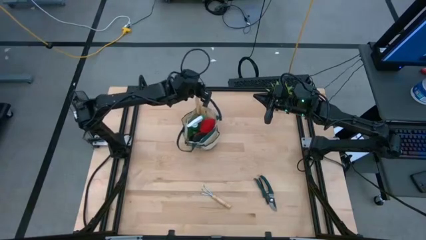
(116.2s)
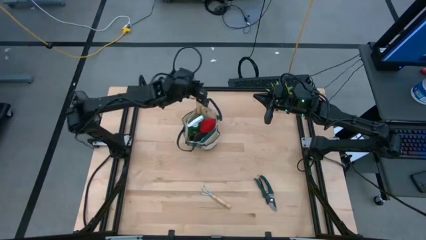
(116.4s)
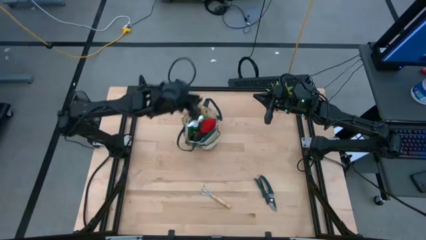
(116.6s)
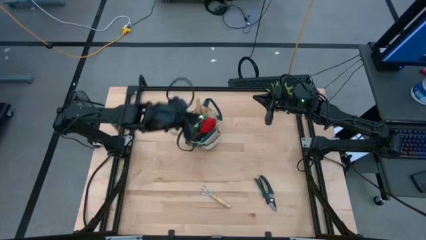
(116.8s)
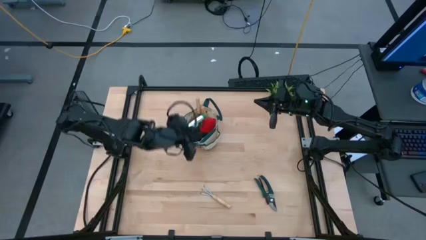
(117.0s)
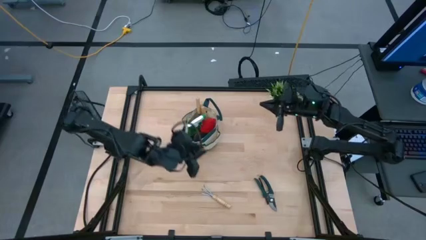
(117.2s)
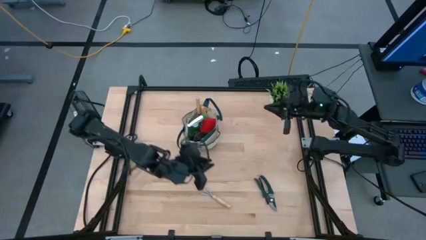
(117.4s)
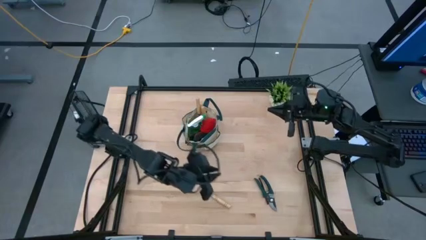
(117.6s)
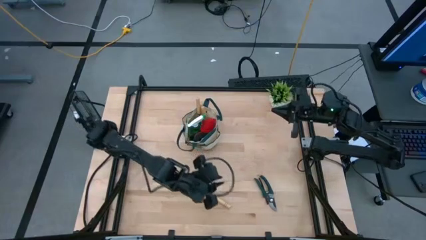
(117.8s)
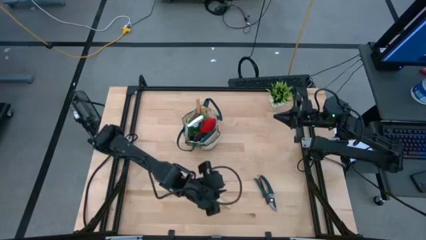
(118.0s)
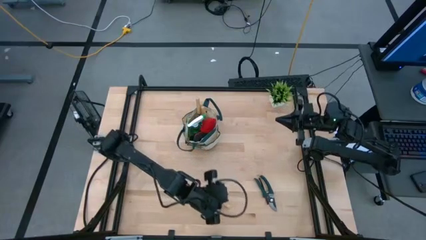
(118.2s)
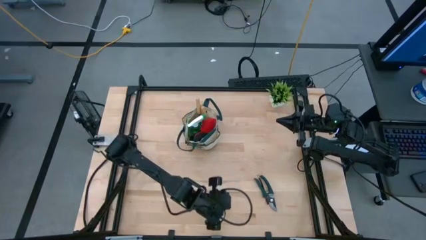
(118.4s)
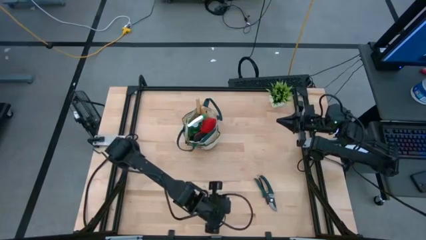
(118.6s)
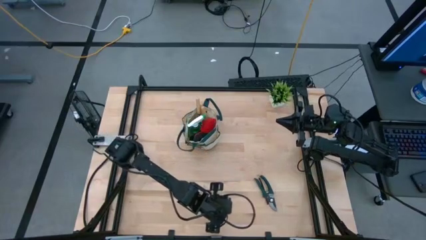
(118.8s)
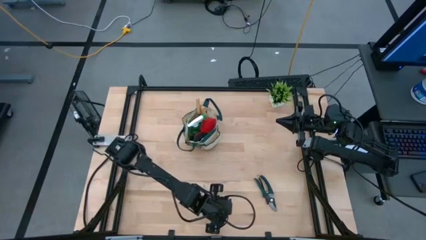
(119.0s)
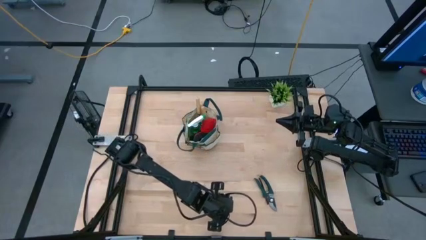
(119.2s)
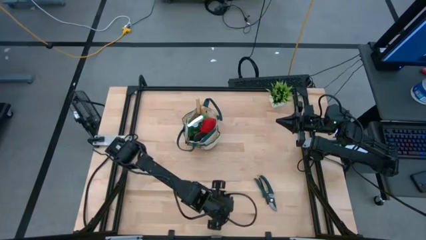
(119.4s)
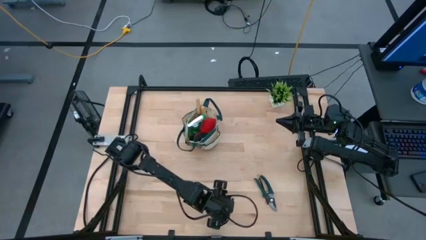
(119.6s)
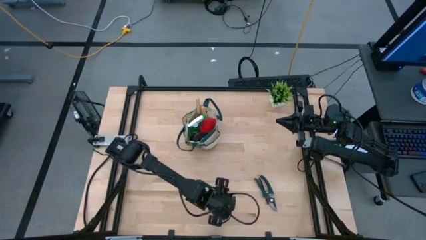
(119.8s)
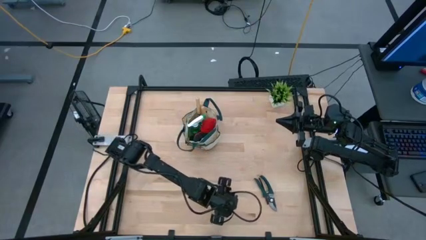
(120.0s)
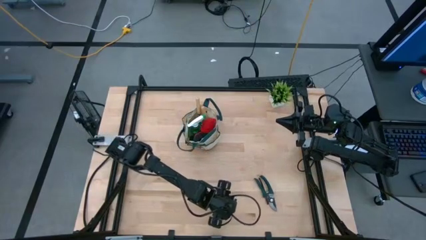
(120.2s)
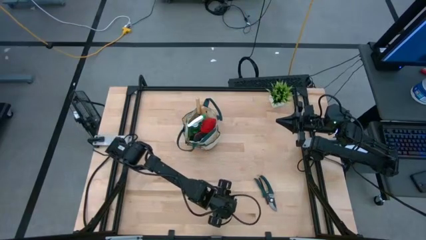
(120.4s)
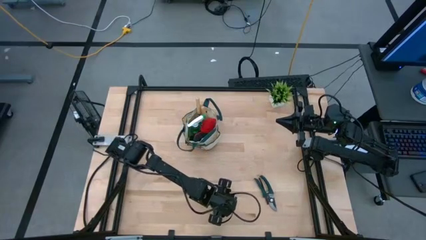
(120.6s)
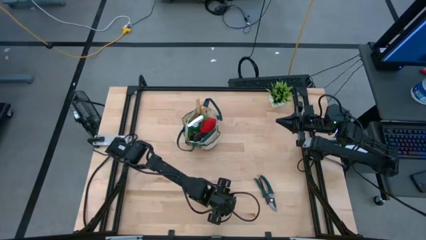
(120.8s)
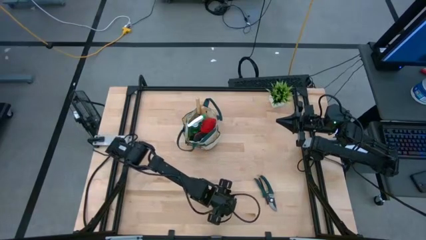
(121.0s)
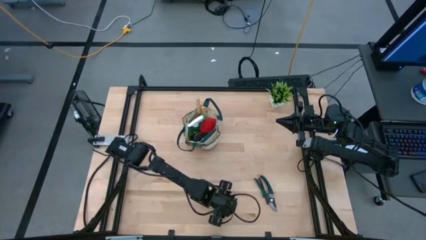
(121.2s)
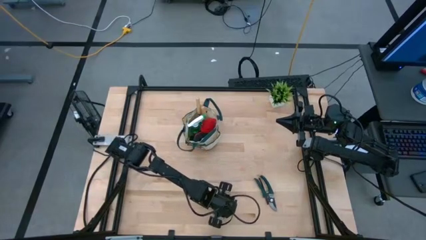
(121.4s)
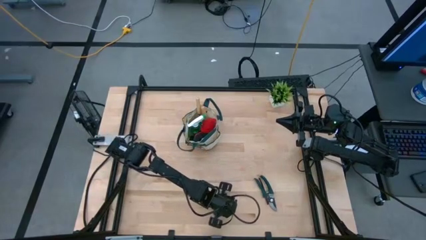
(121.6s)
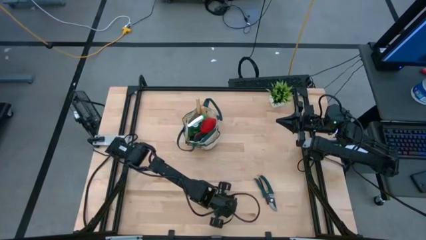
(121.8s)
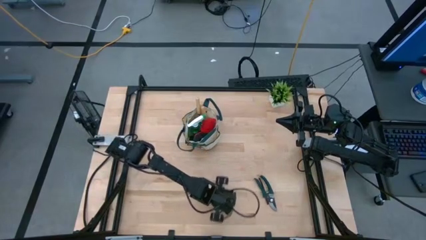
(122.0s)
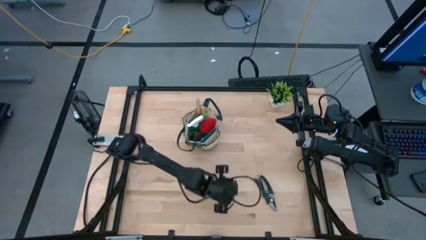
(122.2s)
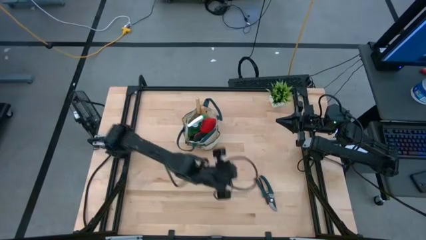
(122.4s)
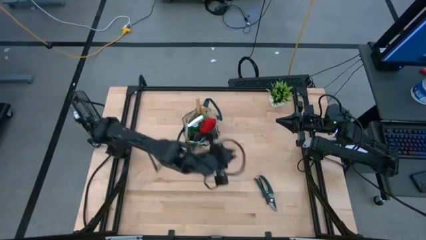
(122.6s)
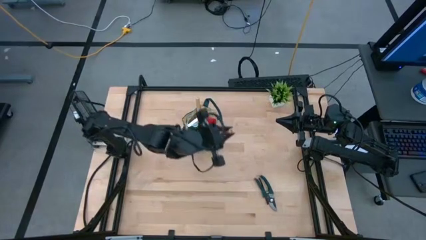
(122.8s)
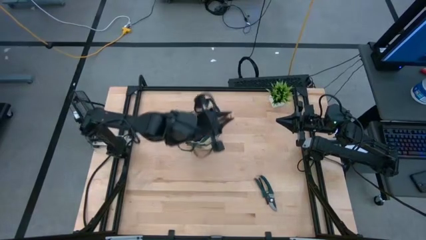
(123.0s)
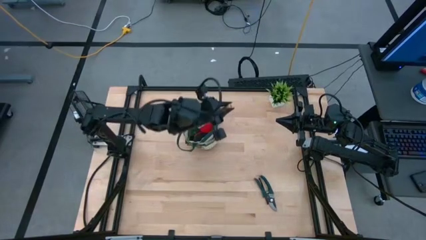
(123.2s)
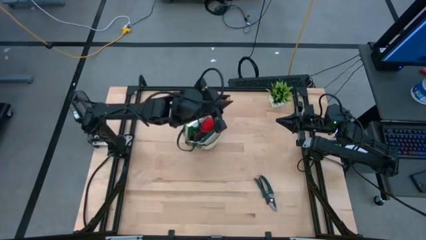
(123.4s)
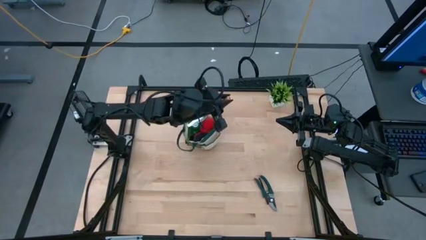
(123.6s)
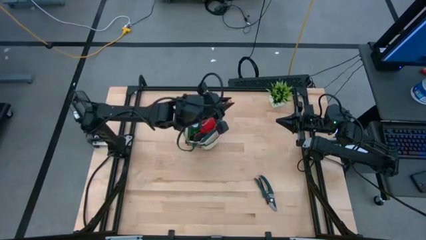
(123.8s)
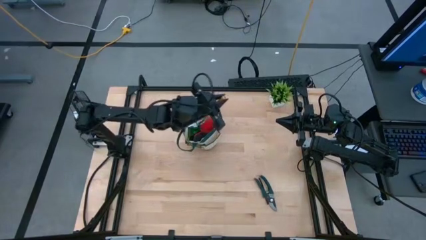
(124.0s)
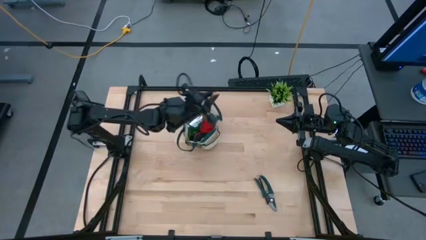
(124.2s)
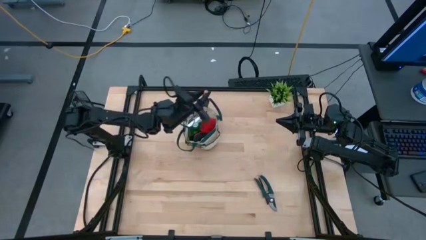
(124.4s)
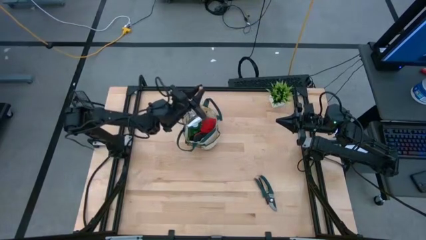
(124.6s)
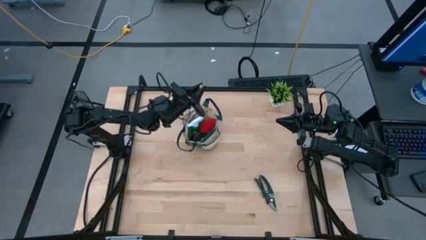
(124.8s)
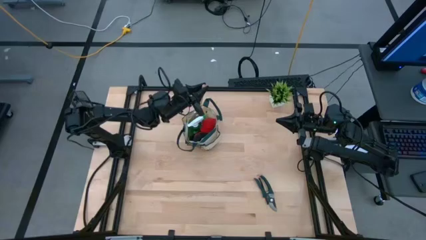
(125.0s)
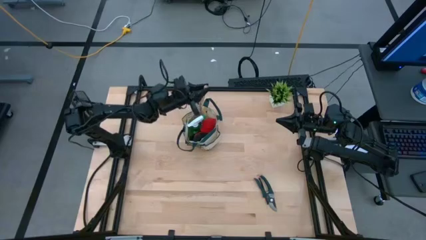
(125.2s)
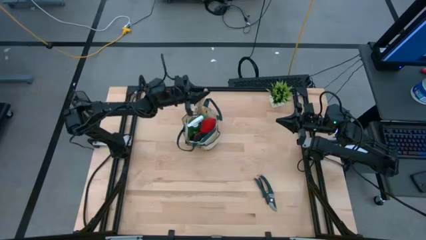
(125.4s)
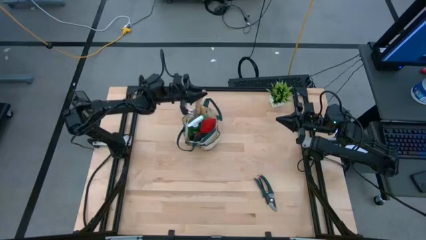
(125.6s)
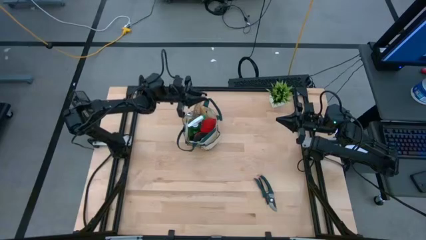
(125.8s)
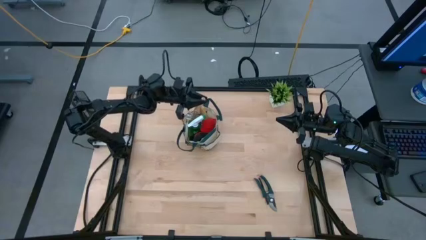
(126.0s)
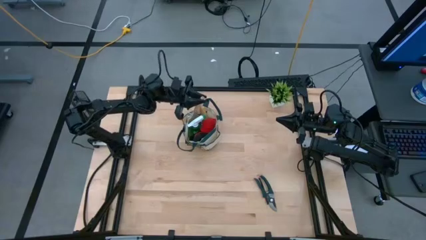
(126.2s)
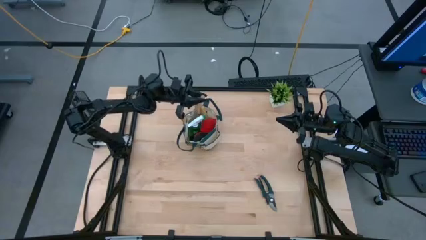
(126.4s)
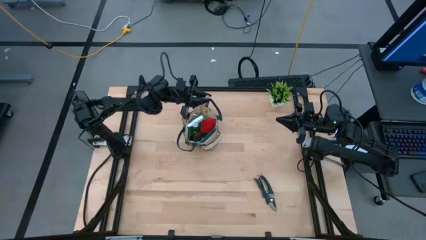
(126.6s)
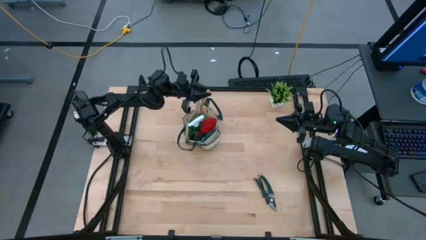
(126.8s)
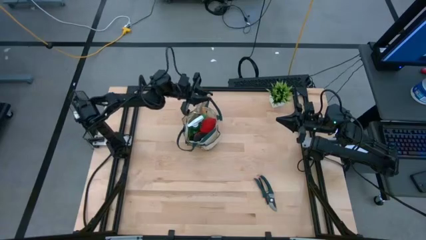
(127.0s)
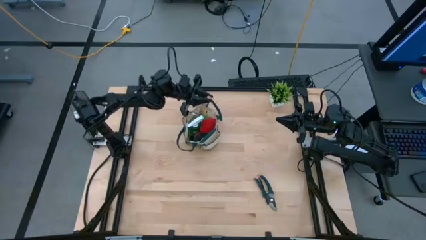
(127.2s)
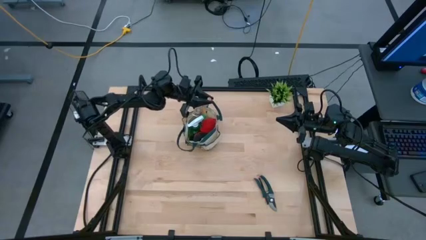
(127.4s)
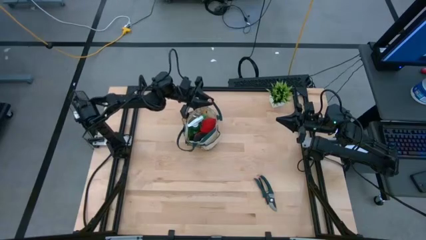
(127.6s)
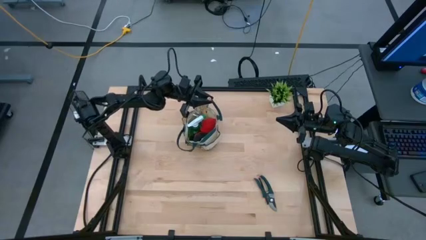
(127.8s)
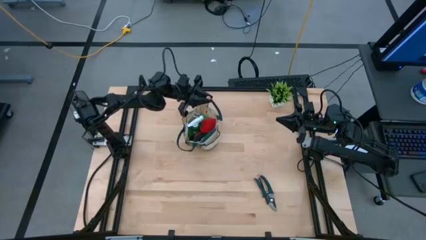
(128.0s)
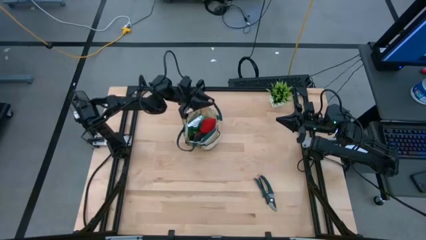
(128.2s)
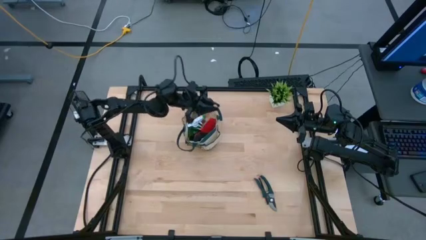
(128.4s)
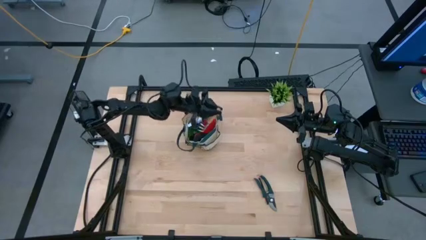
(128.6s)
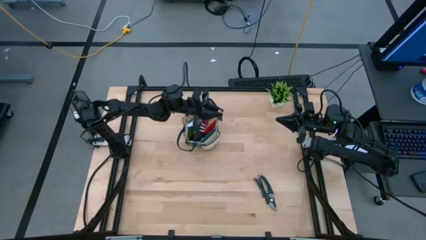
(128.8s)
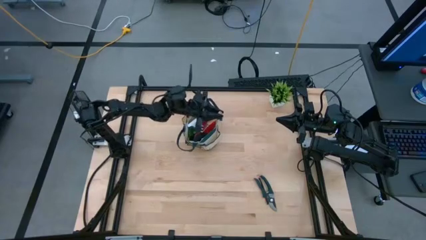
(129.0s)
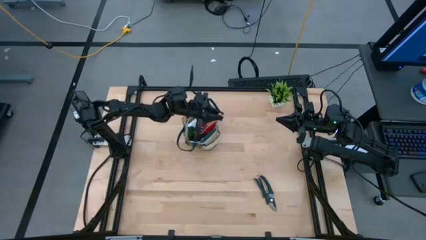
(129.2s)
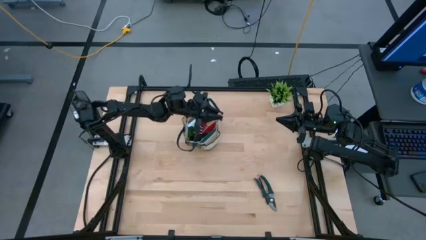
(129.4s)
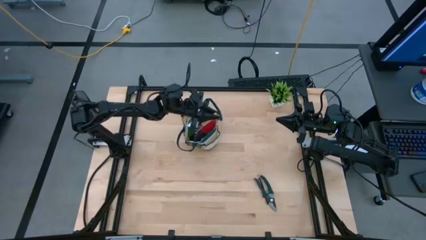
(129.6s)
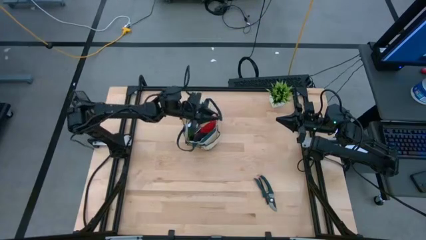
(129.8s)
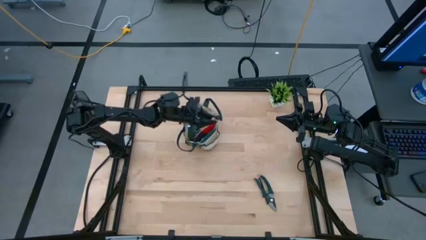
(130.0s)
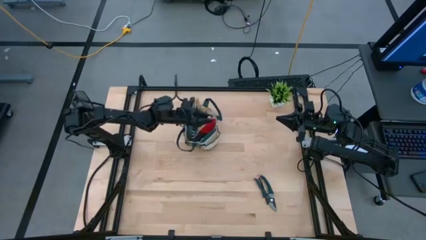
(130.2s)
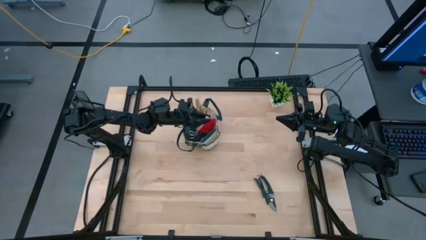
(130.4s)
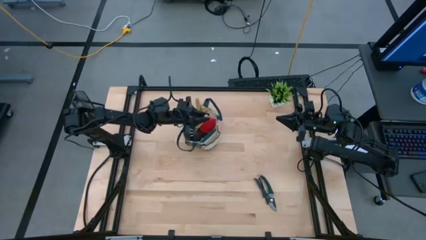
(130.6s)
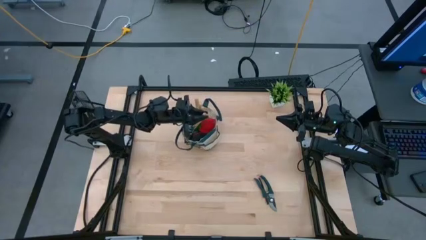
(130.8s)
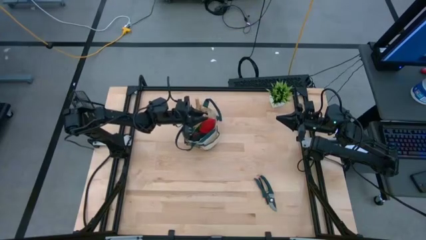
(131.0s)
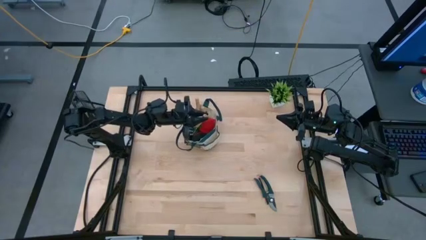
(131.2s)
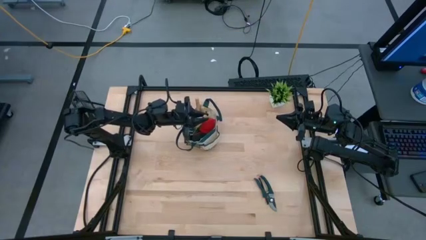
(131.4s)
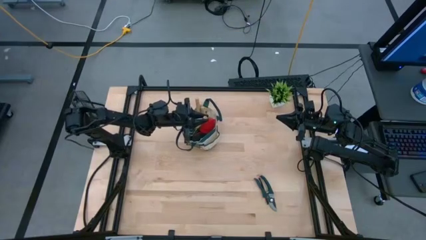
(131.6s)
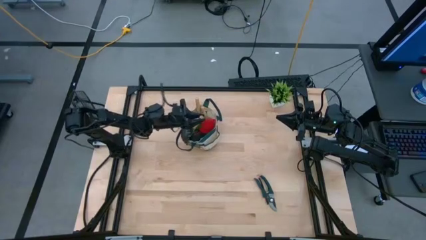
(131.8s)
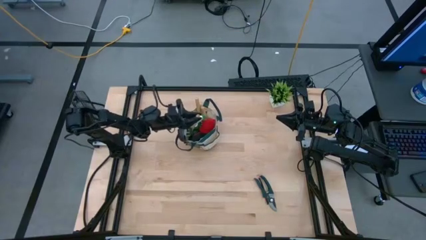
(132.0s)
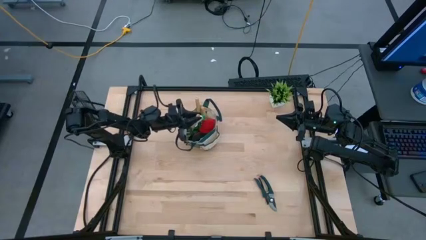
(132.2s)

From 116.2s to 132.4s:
Task: Pick & Place Garden tools in Gardening bag
Put the hand rake into the gardening bag
